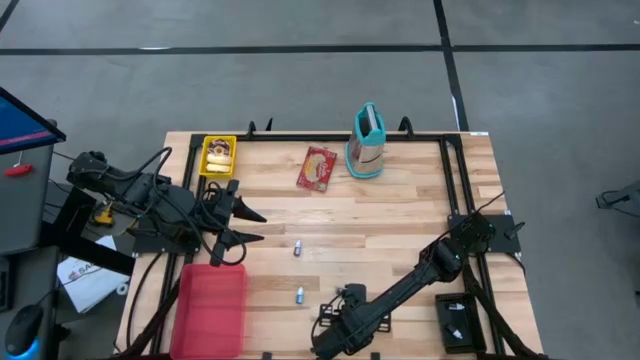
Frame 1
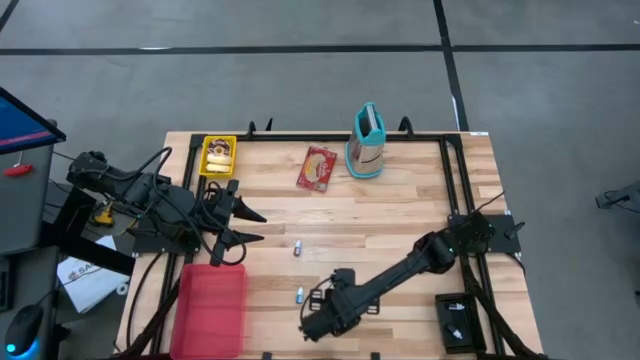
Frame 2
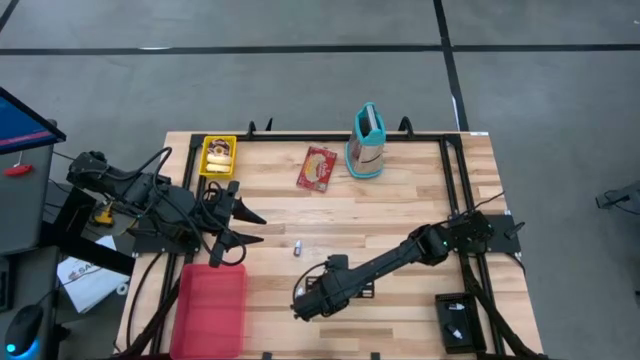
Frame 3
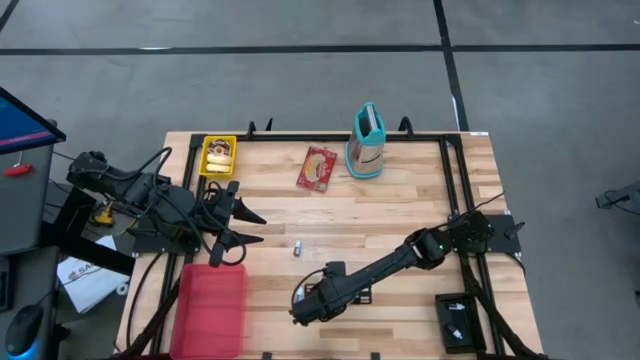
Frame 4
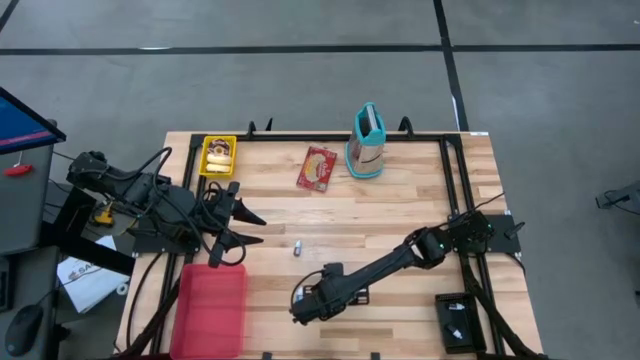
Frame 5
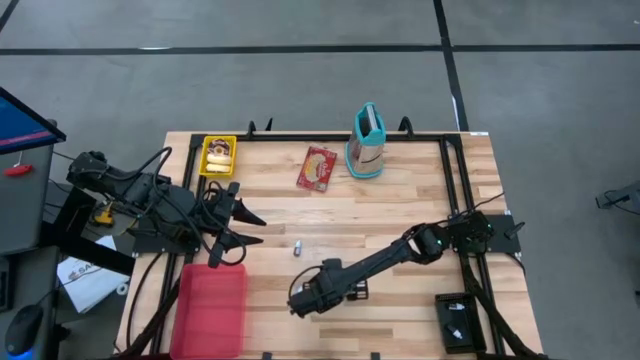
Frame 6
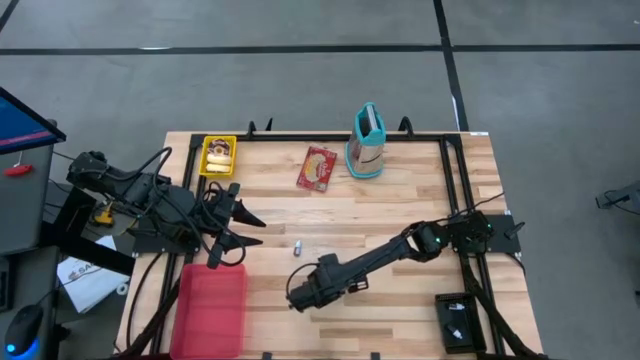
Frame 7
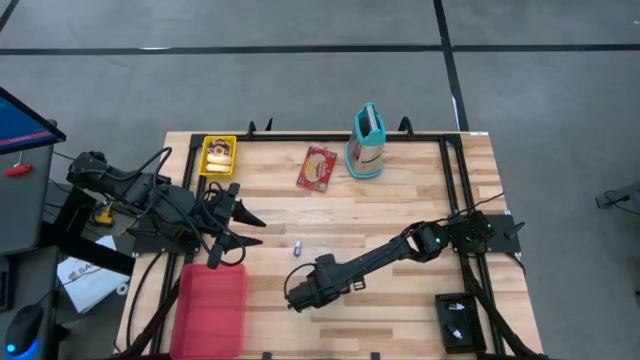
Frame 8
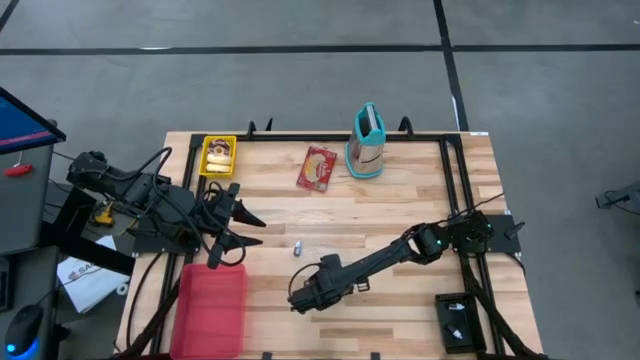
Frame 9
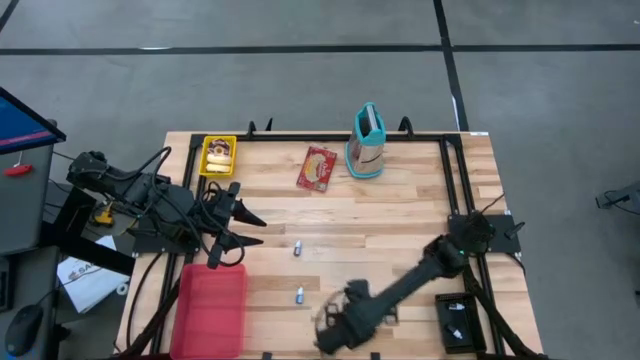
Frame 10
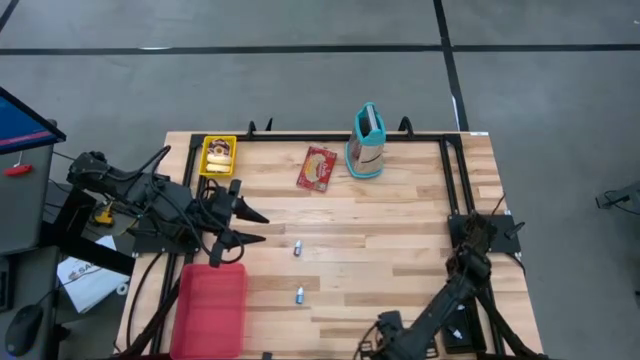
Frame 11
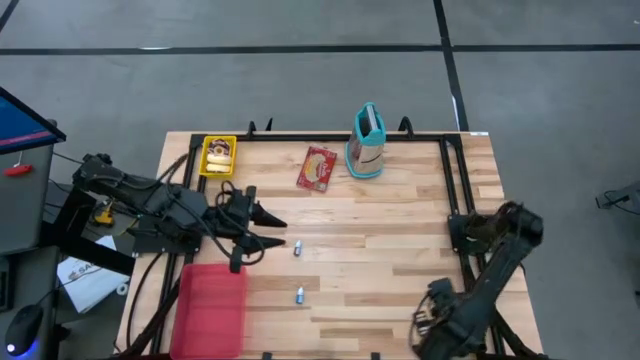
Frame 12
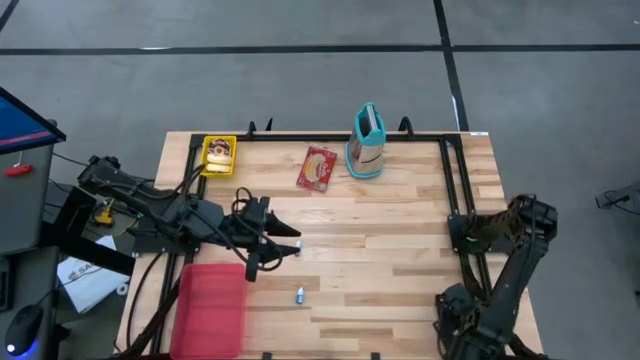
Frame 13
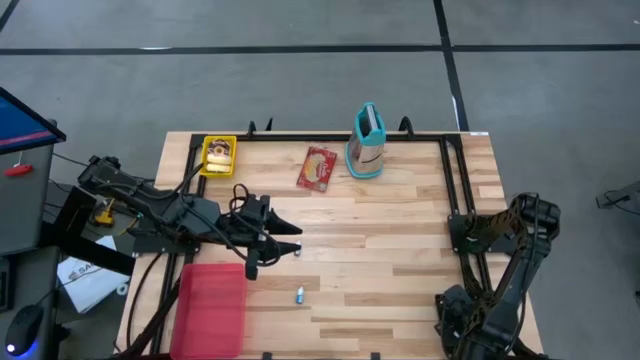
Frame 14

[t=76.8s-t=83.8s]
Put the green food coloring bottle into the container

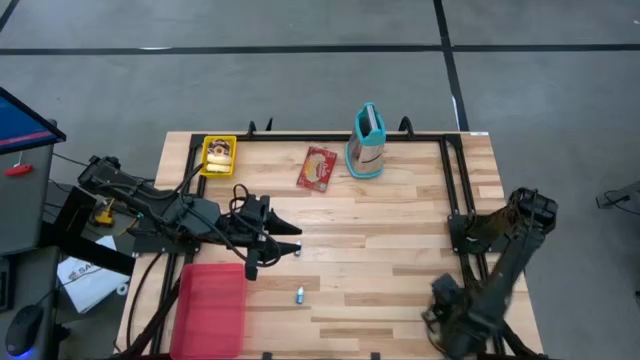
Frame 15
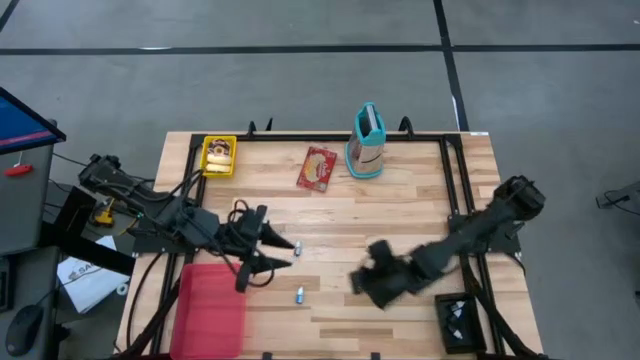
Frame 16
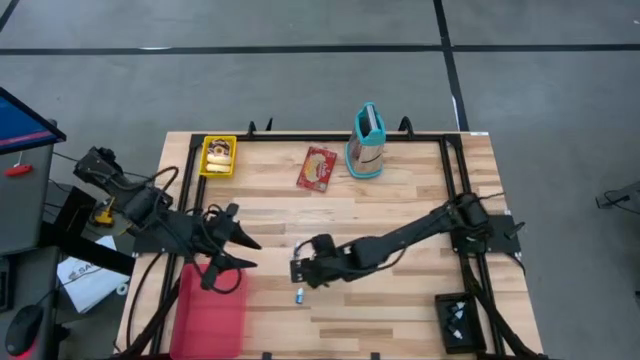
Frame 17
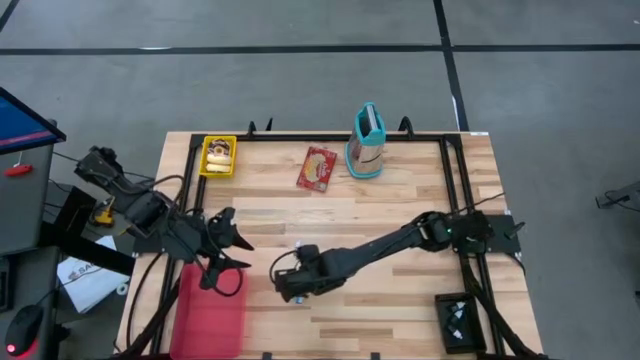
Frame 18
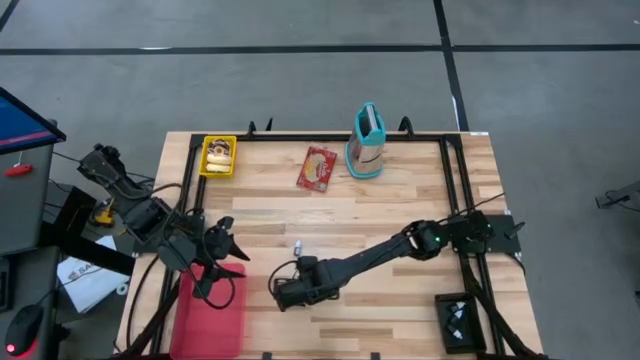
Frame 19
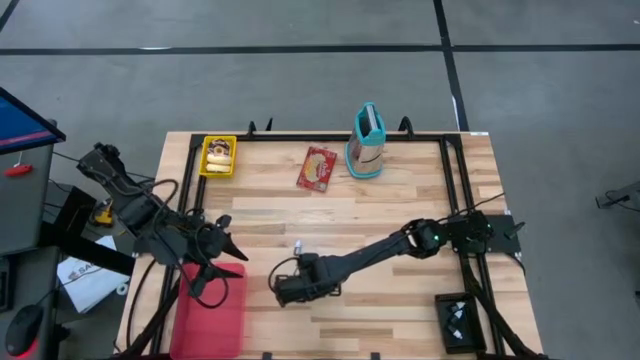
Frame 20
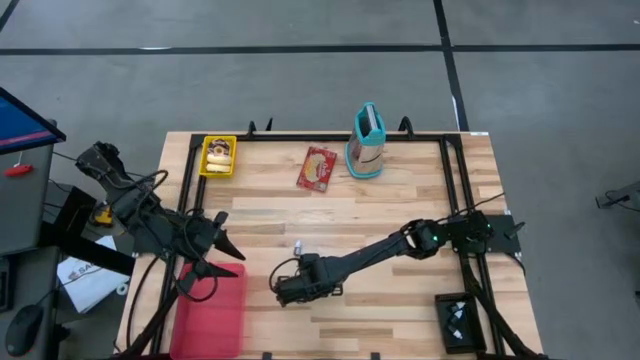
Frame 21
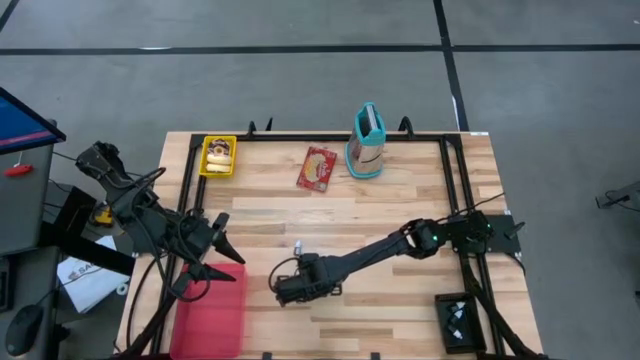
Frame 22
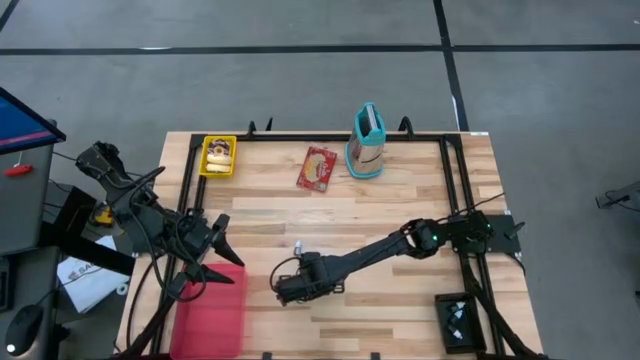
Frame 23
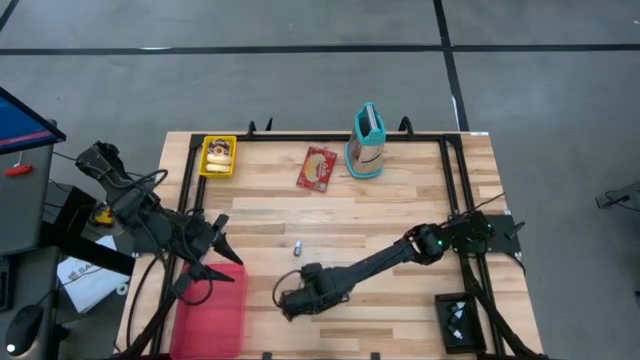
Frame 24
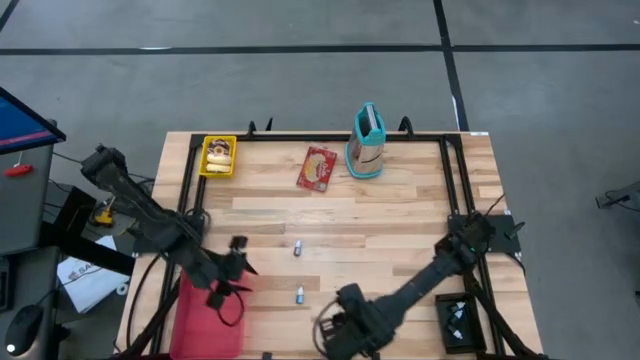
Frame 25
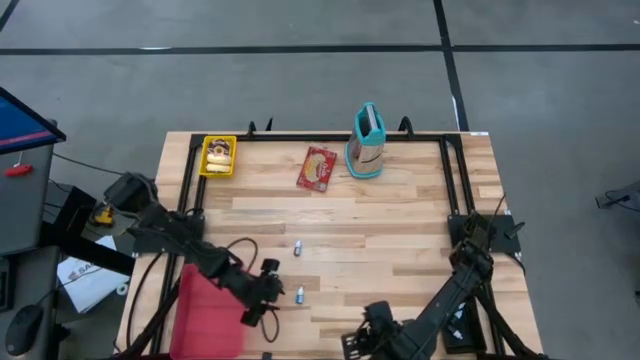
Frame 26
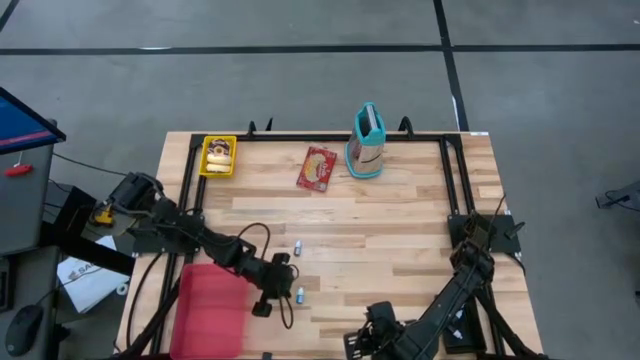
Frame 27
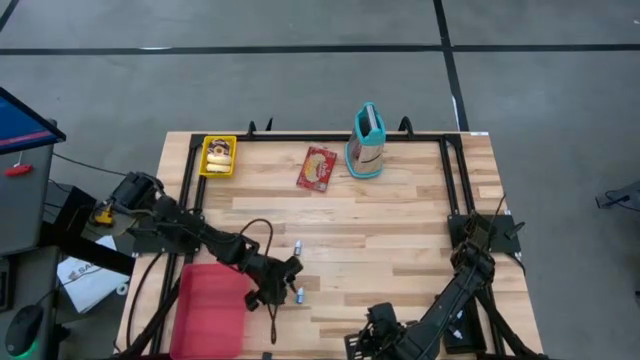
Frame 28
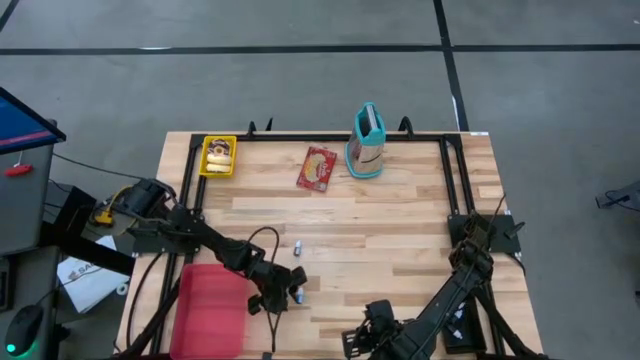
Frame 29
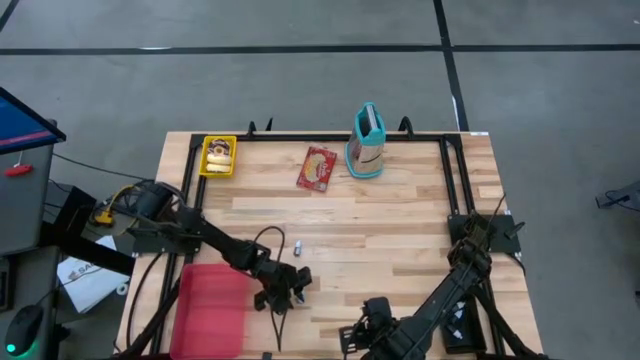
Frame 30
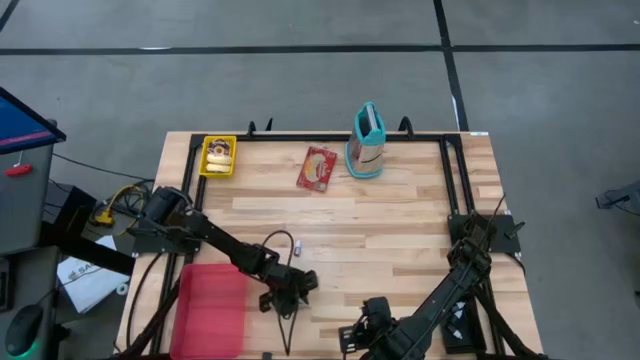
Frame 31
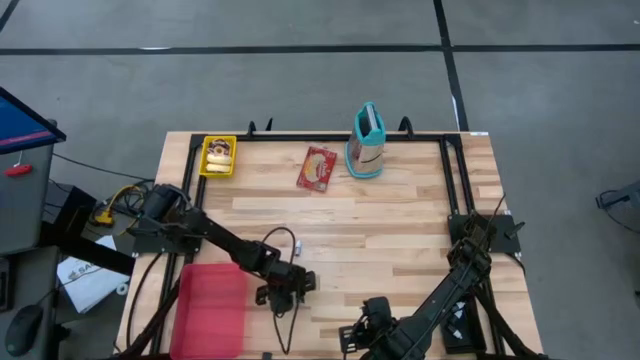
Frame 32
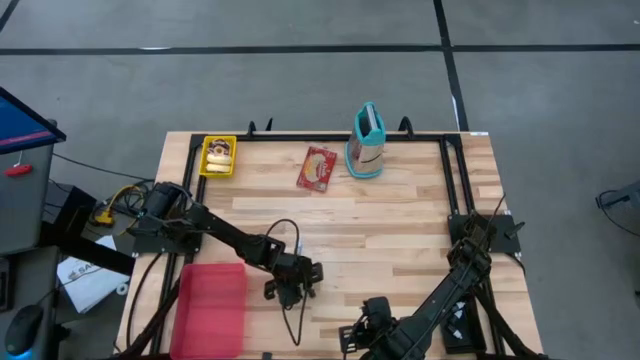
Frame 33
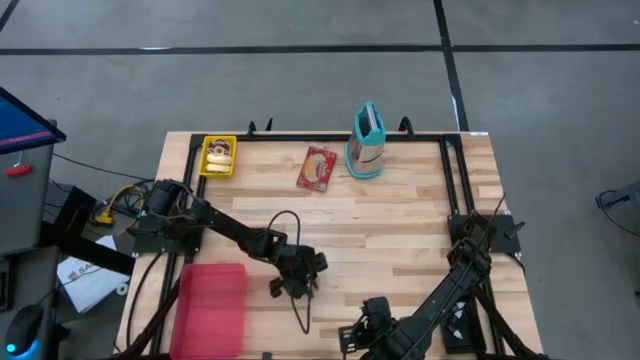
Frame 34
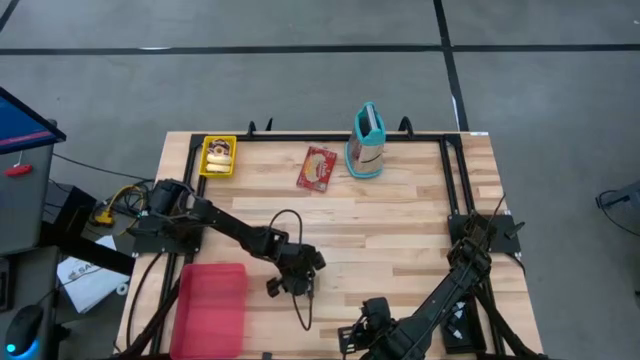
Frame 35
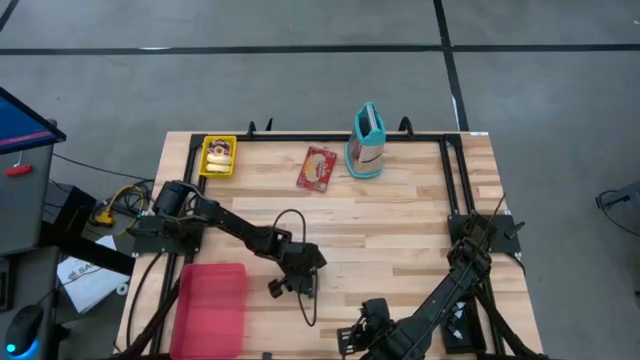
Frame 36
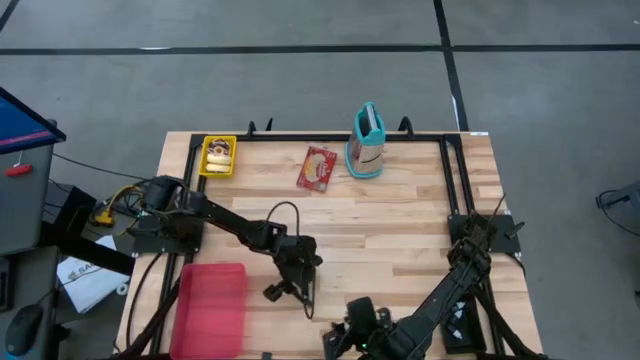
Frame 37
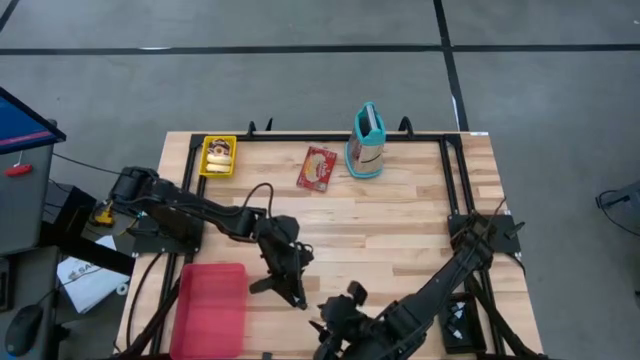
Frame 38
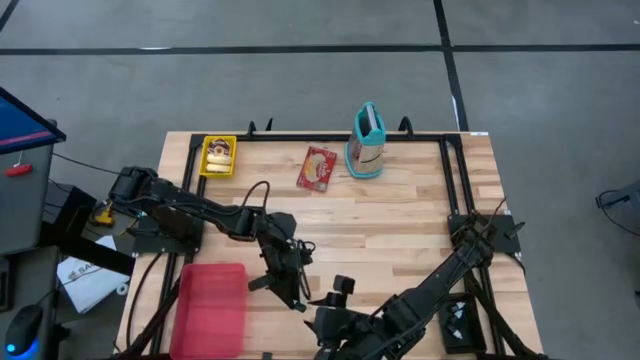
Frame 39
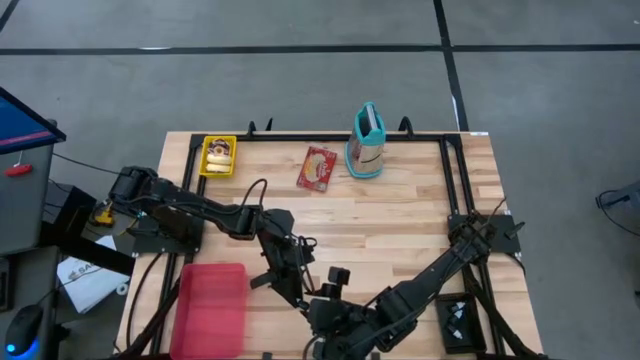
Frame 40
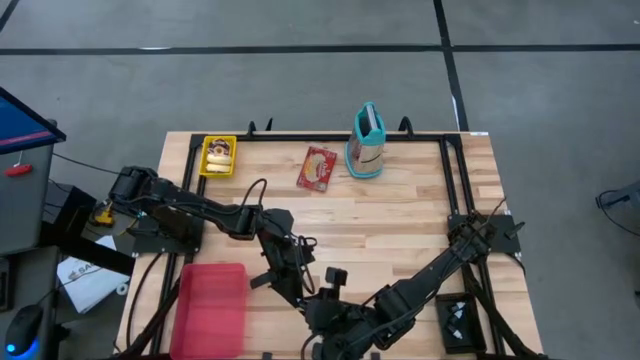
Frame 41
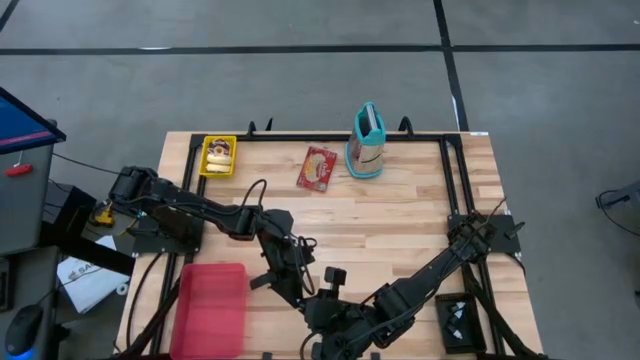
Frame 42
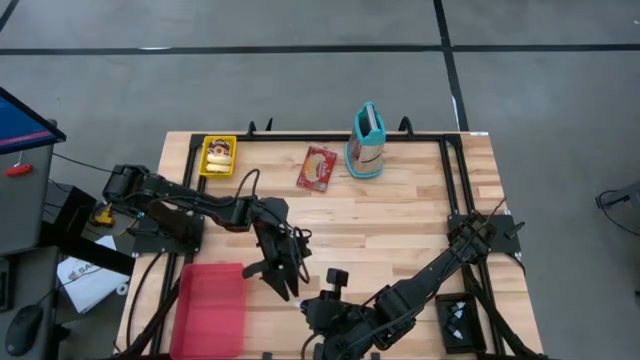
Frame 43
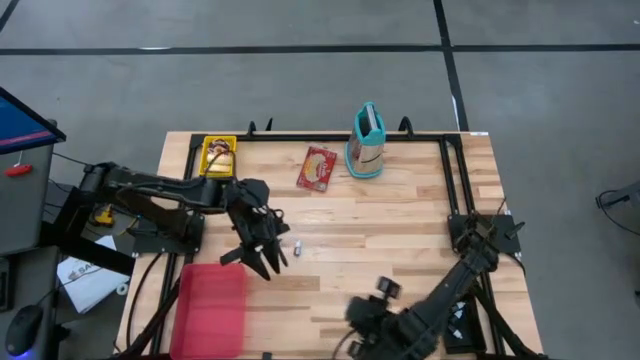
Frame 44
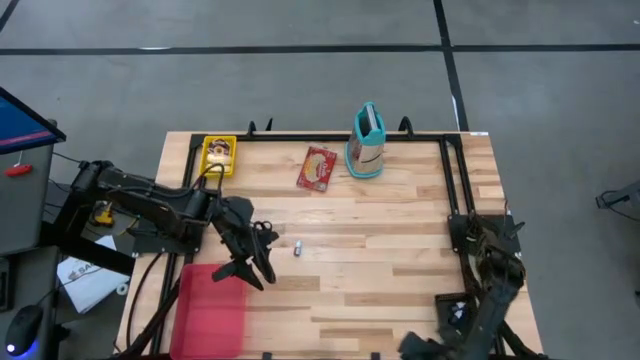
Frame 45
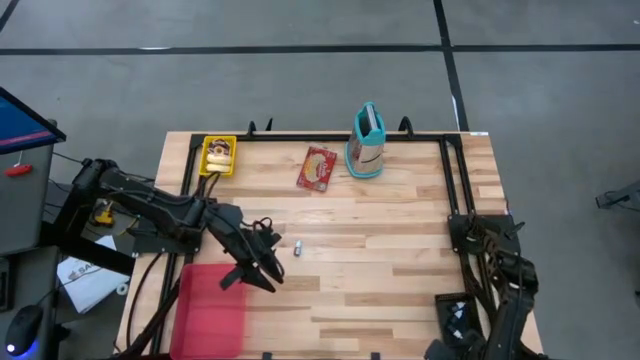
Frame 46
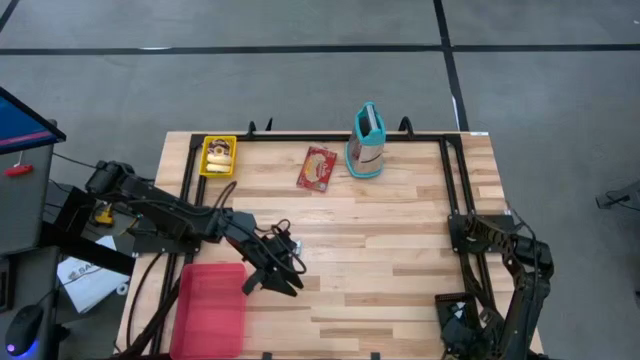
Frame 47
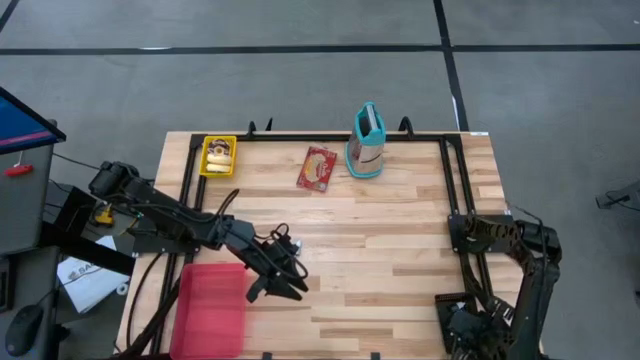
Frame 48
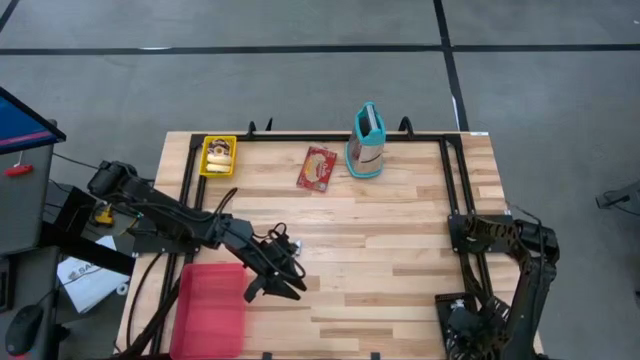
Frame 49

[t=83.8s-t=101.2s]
Put the blue food coloring bottle in the black basket
